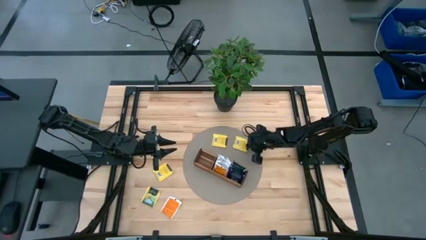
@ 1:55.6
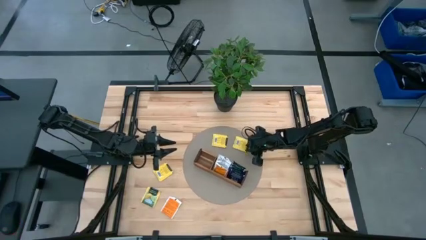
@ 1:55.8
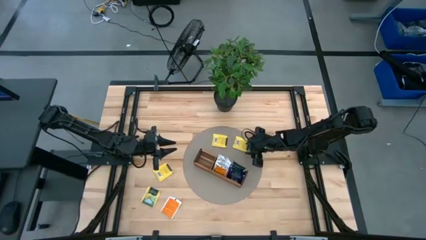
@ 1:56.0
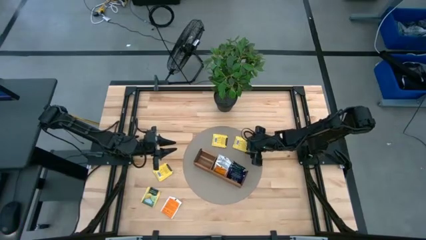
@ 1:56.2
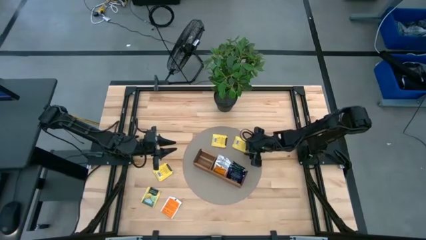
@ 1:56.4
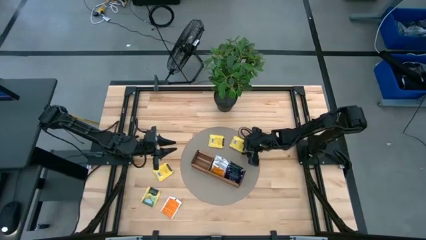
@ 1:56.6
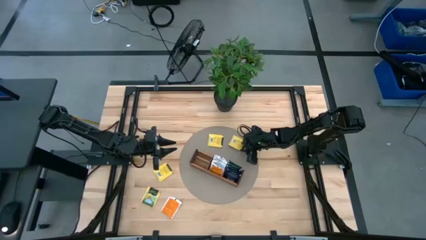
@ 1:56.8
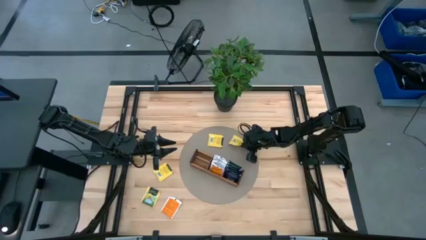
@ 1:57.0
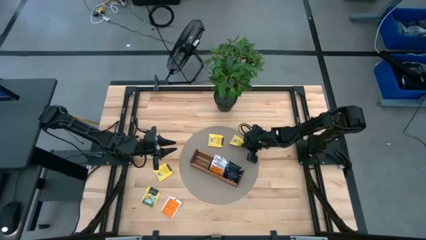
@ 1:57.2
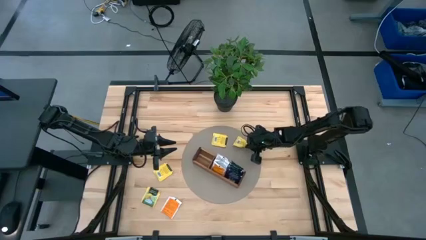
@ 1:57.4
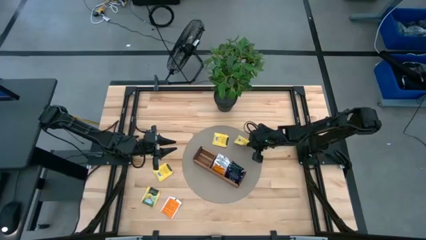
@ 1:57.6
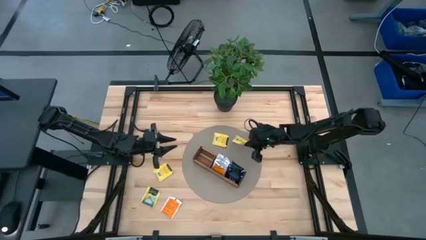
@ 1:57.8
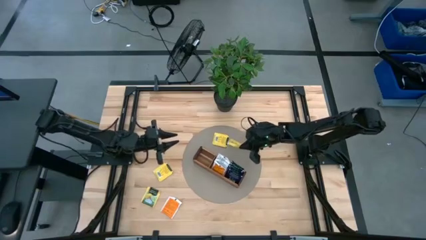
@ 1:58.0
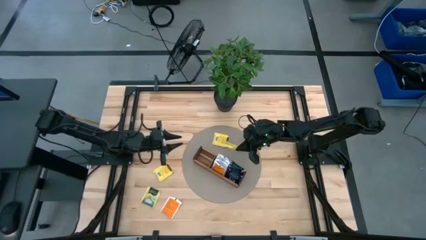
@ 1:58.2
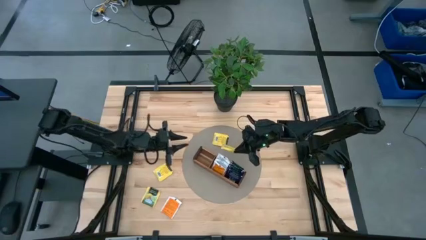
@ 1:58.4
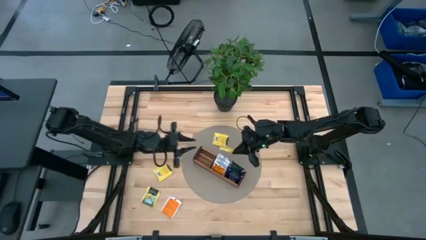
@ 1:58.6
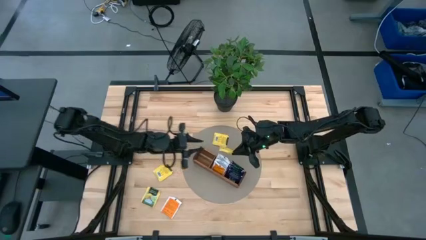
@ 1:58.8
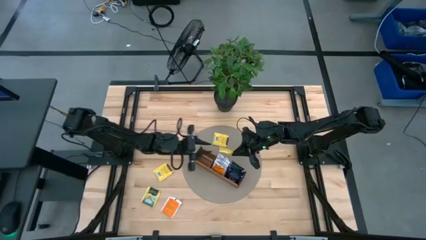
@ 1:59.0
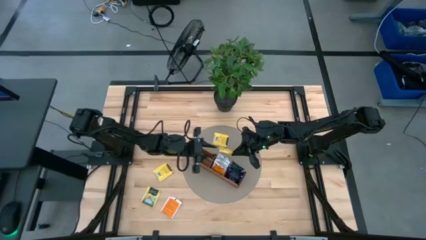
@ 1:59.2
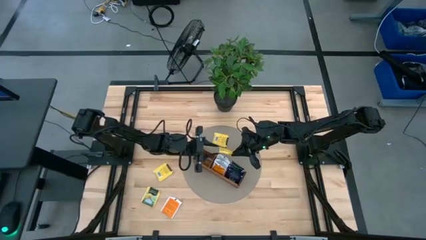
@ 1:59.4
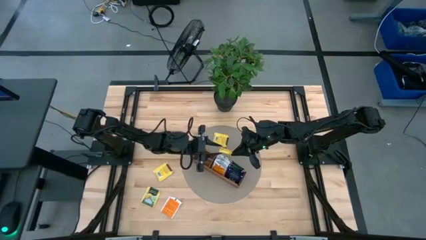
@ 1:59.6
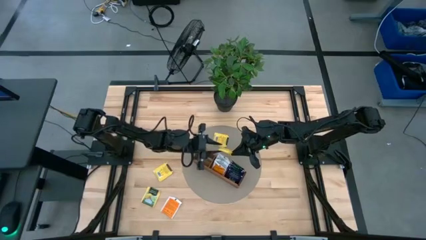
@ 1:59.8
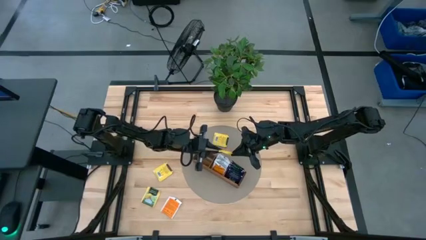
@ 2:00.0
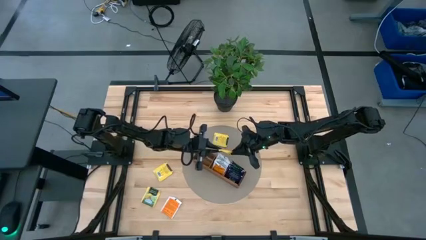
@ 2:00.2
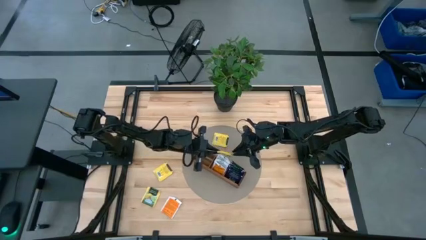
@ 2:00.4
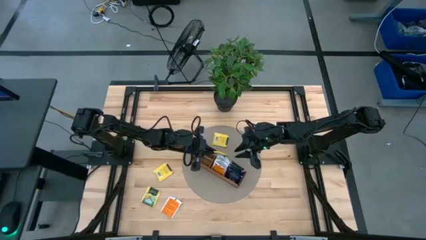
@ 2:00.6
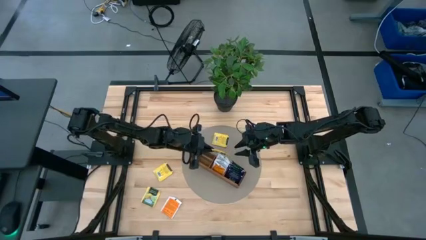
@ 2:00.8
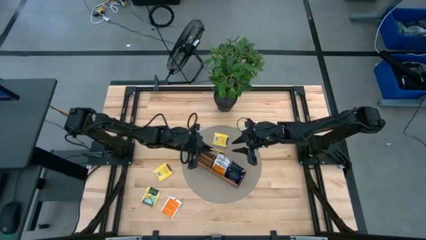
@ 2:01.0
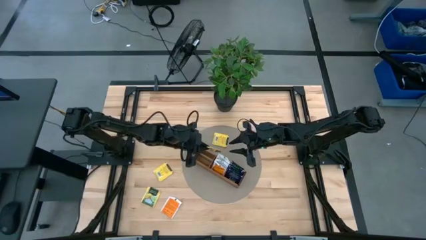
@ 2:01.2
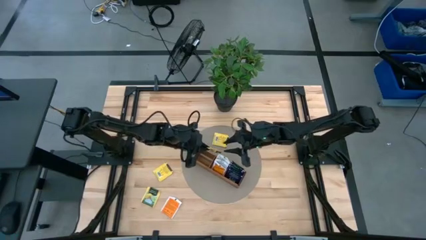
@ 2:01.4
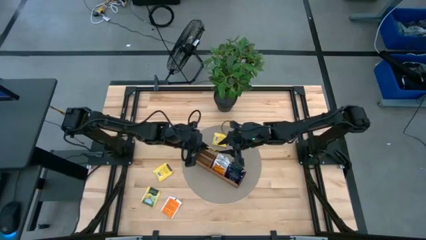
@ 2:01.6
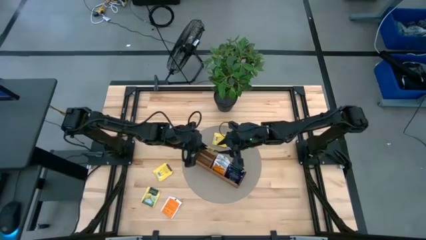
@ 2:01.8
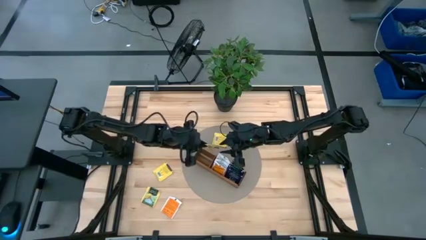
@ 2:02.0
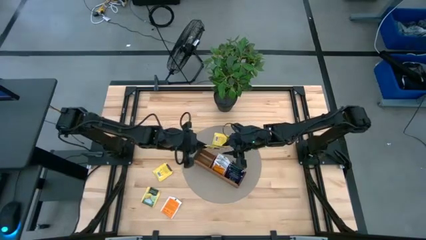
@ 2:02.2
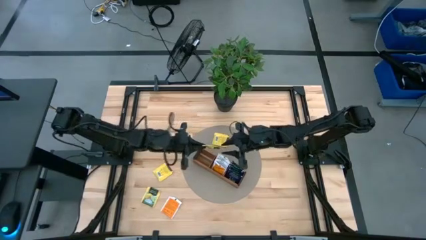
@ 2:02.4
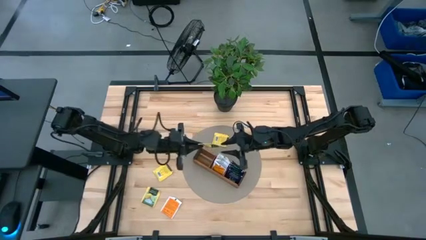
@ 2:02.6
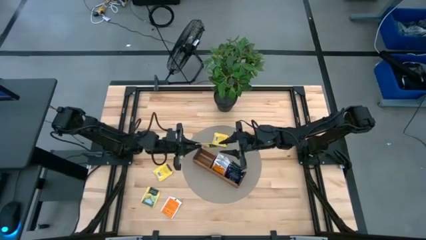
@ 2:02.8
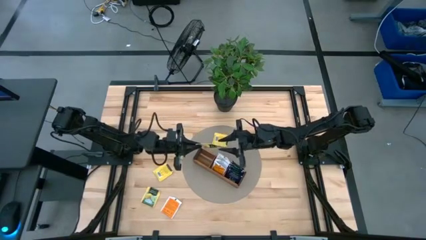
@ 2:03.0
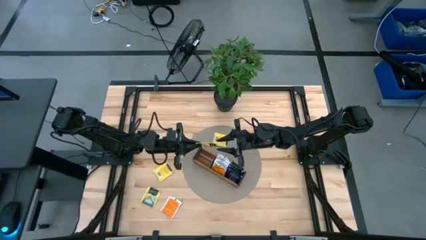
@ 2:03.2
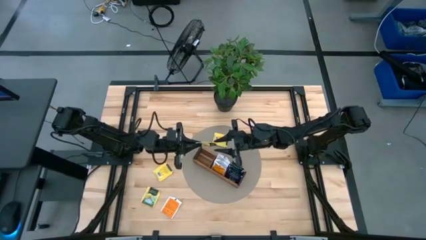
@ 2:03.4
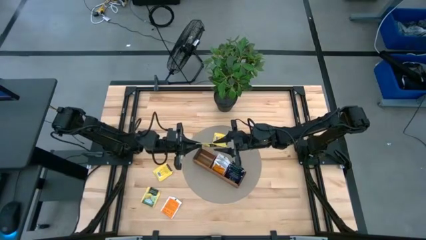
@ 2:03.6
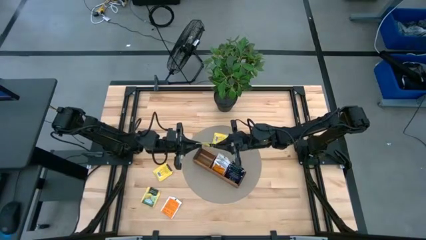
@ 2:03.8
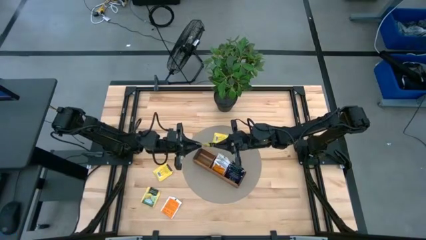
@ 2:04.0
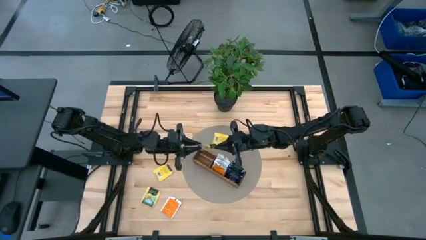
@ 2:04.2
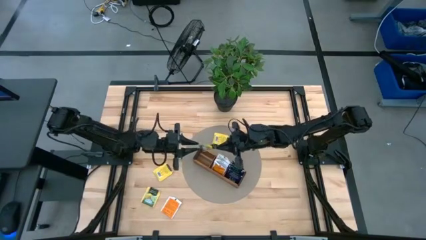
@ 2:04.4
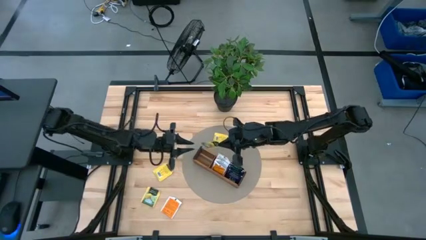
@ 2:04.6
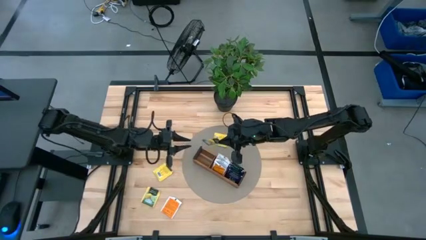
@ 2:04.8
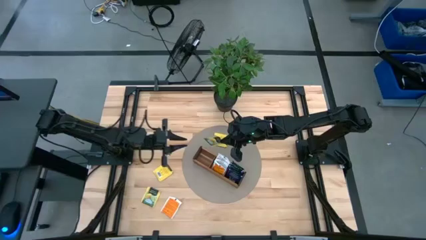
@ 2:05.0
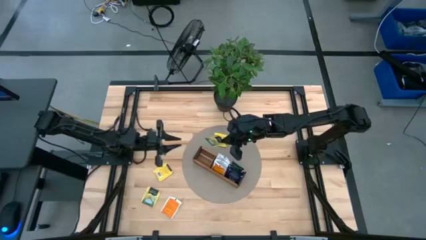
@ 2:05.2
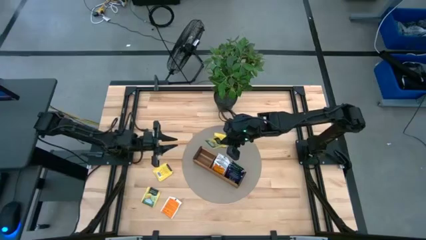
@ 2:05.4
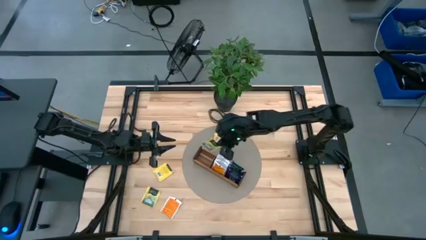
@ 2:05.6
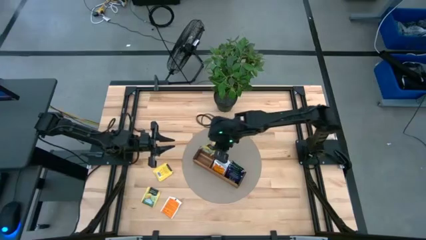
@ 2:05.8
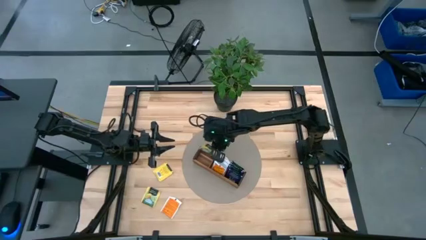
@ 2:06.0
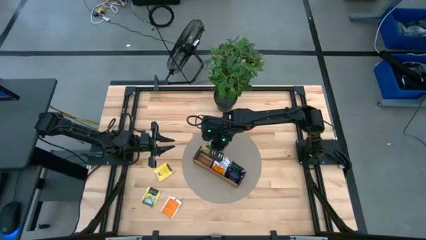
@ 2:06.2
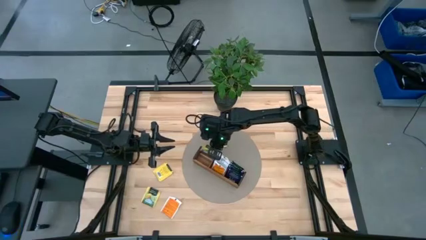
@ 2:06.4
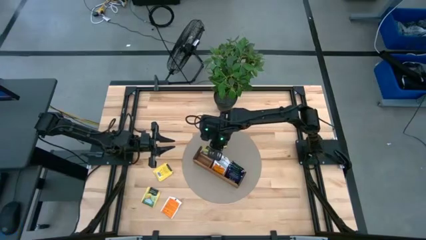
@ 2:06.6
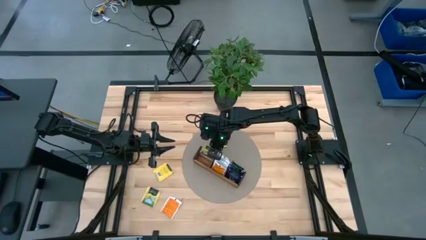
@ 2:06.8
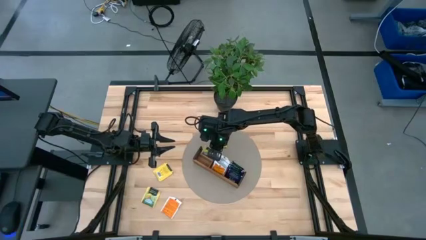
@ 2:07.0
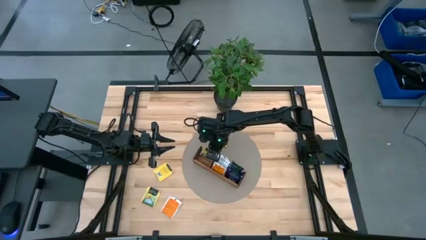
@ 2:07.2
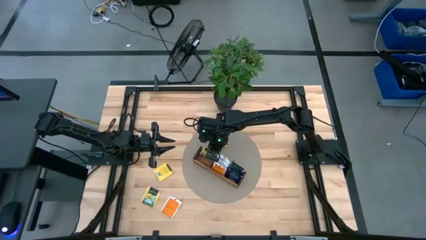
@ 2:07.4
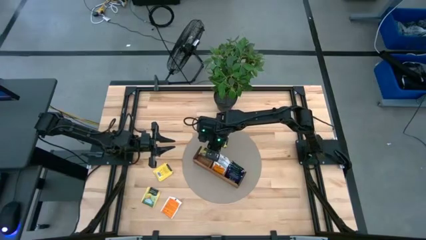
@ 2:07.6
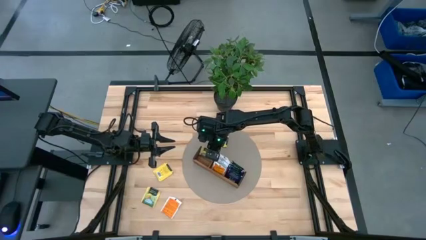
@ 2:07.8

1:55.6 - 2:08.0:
Task: Pick & Place Tea
Put the yellow tea bag into the left section of the wooden organizer

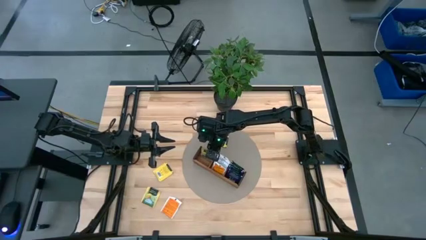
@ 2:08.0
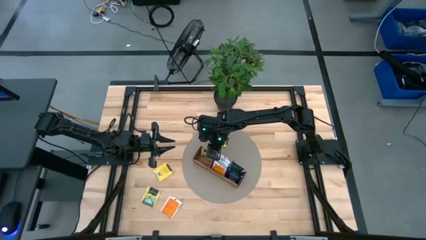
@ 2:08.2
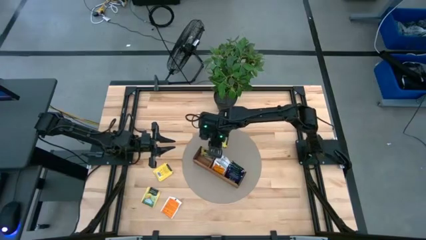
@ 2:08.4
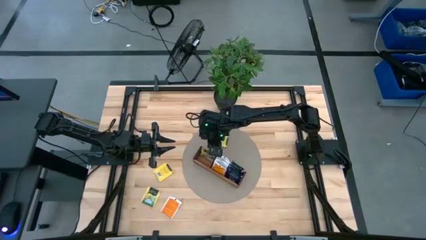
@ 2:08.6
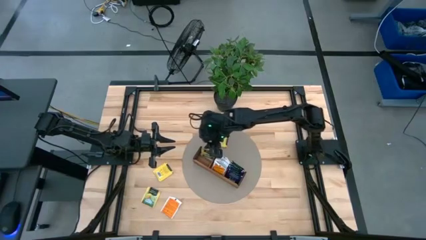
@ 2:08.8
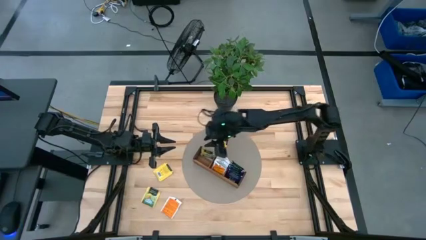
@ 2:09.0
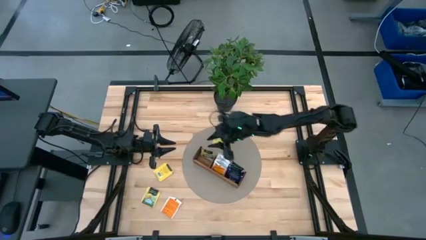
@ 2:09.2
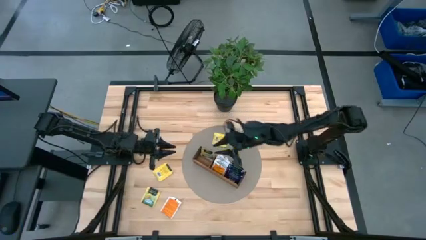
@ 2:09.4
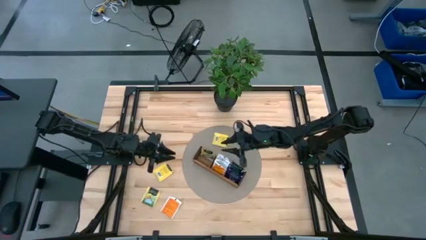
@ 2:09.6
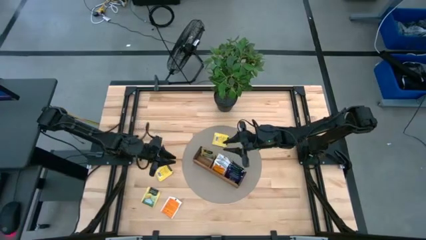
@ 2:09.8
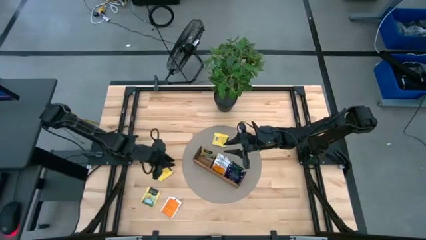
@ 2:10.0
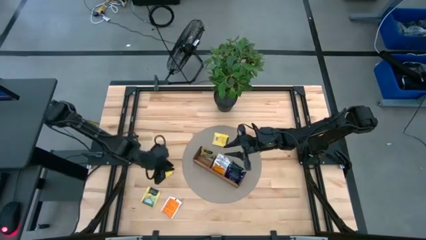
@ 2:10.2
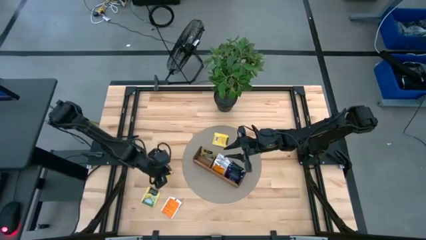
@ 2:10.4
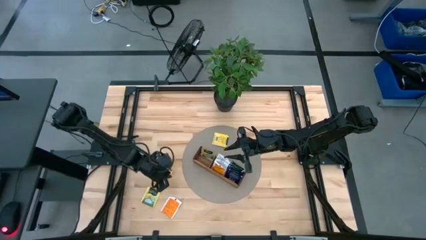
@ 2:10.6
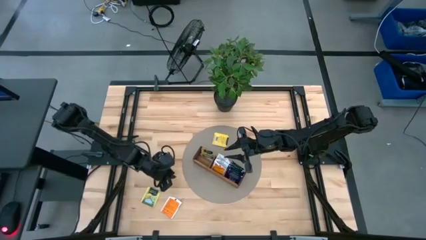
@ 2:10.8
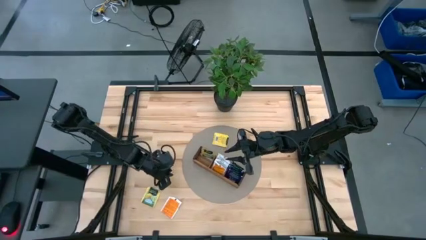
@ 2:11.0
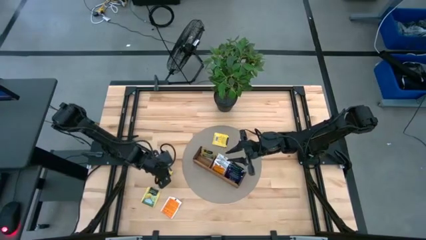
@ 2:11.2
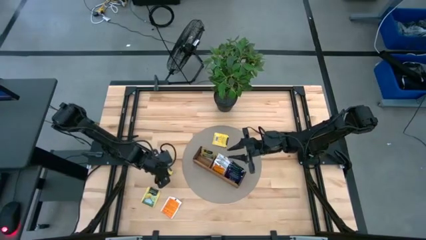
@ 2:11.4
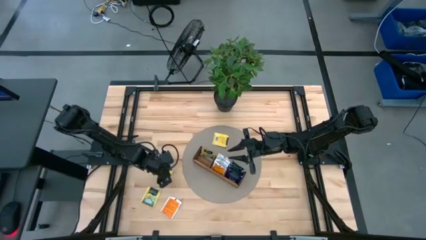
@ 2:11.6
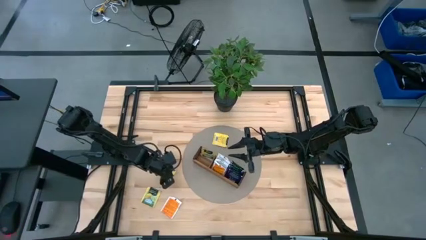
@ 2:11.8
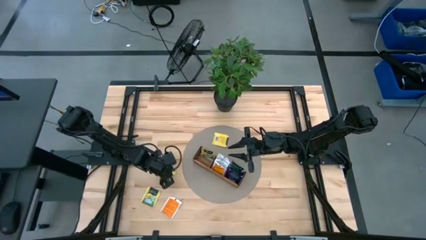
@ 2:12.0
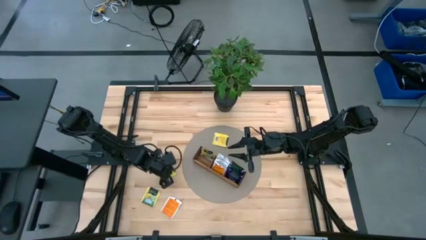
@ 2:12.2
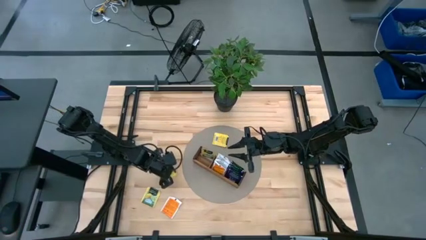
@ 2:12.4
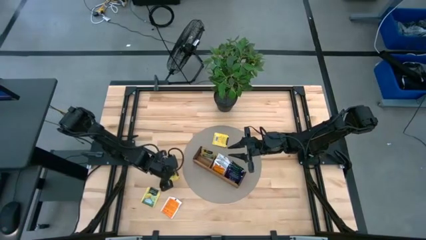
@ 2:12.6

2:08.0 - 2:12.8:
Put the yellow tea bag into the left section of the wooden organizer

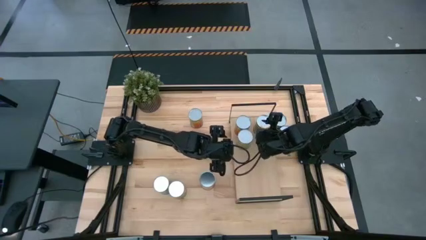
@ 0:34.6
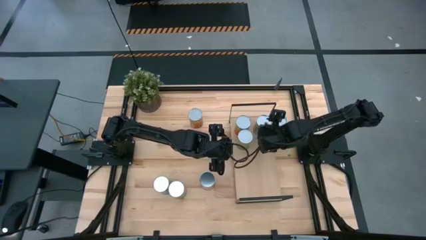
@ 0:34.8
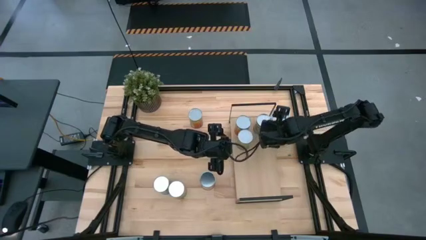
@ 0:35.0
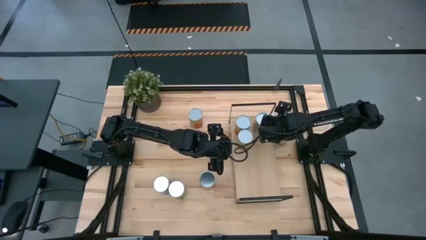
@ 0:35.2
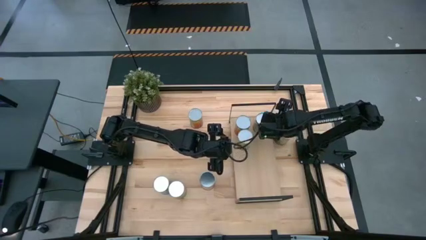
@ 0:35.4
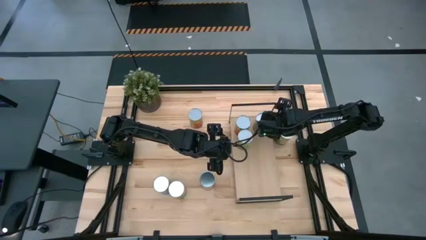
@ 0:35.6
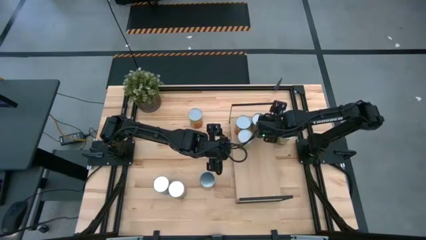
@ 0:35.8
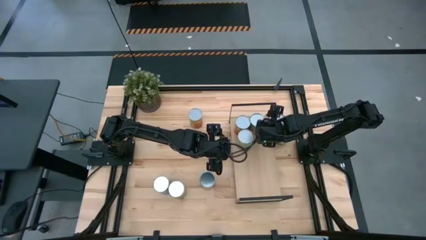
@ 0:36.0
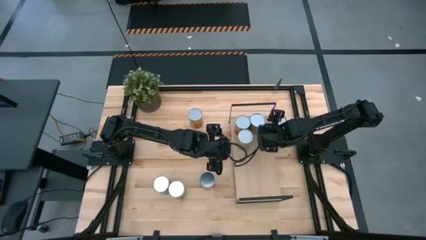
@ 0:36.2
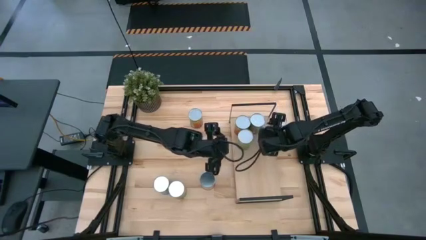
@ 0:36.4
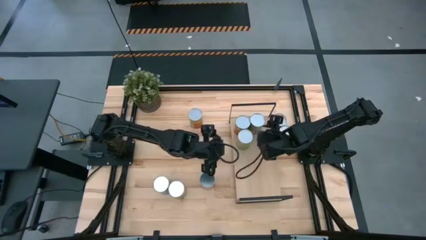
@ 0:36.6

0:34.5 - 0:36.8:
Task: Pick and place cans onto a shelf
Adjust the canned peaches on the shelf
